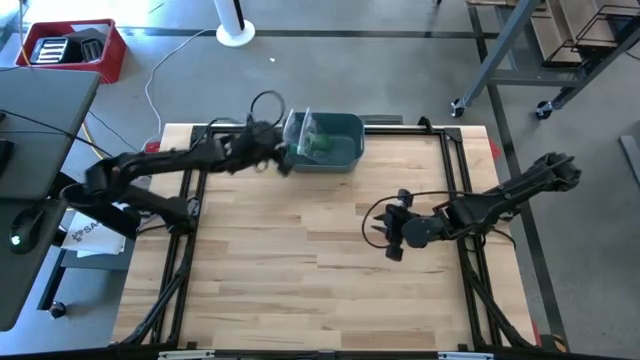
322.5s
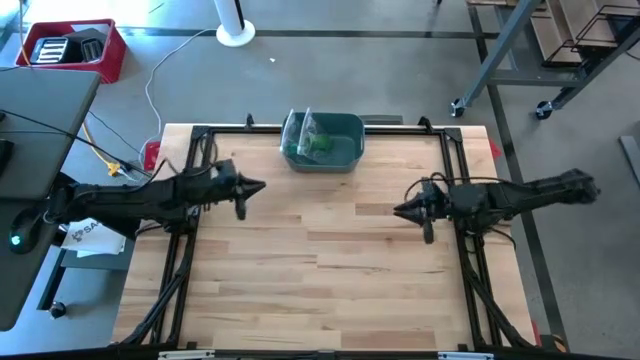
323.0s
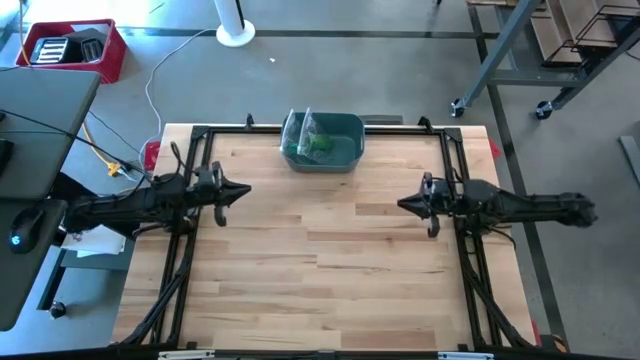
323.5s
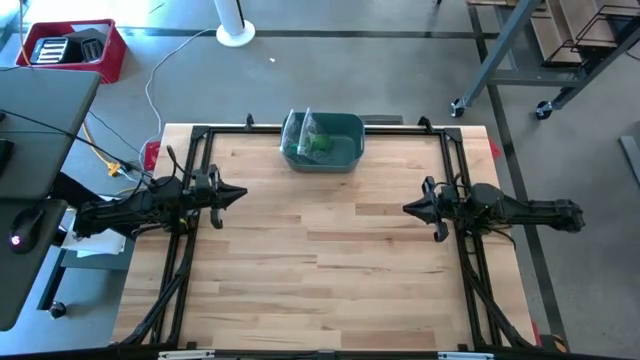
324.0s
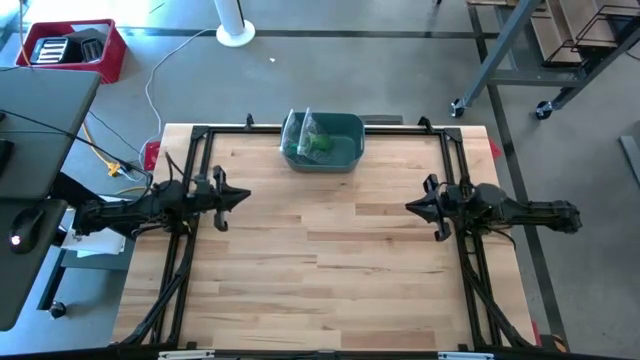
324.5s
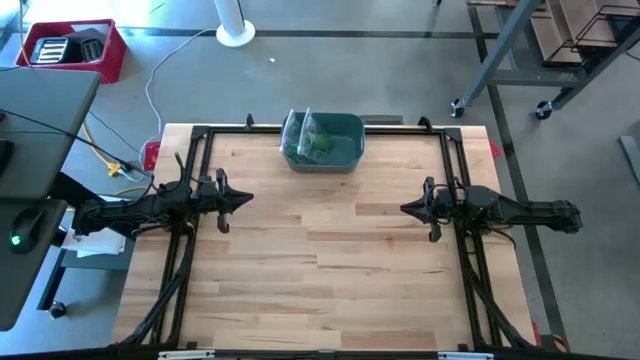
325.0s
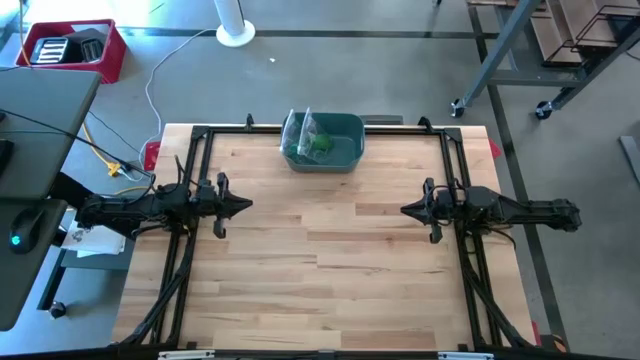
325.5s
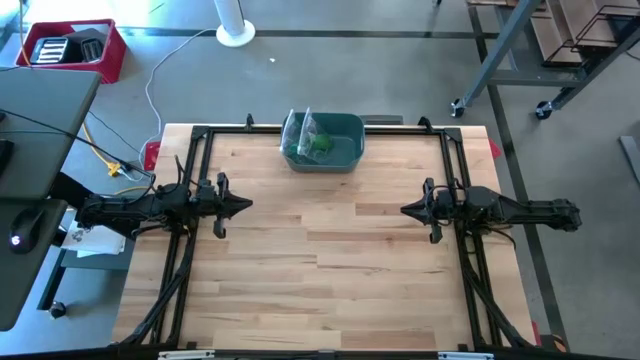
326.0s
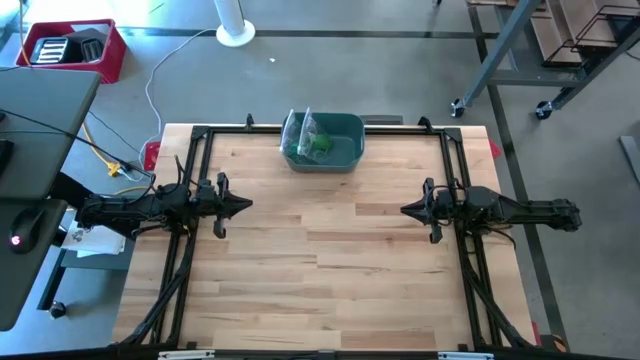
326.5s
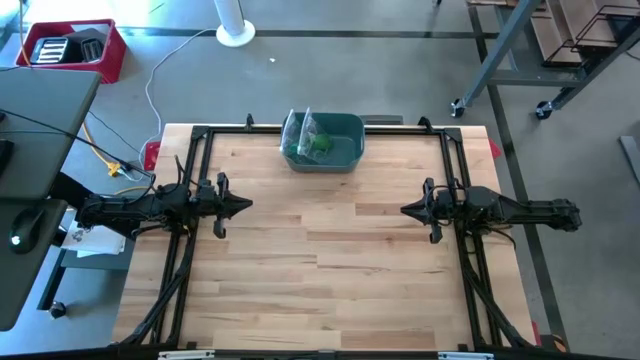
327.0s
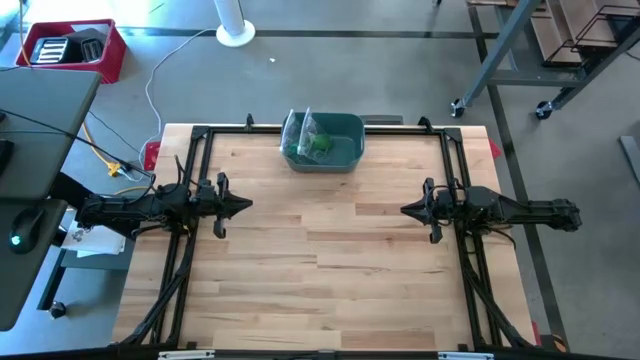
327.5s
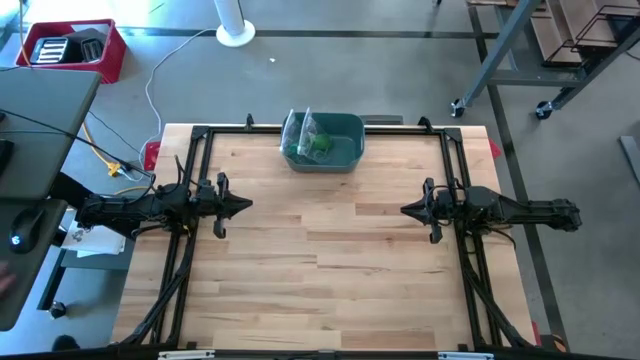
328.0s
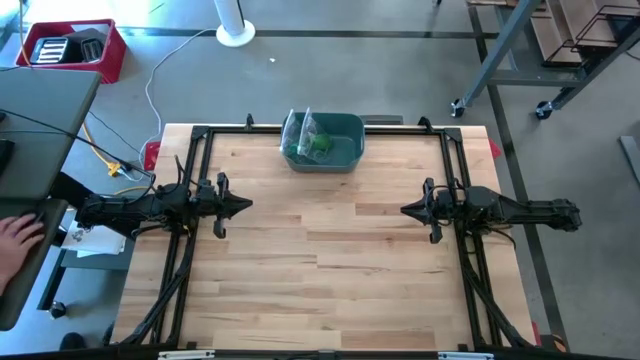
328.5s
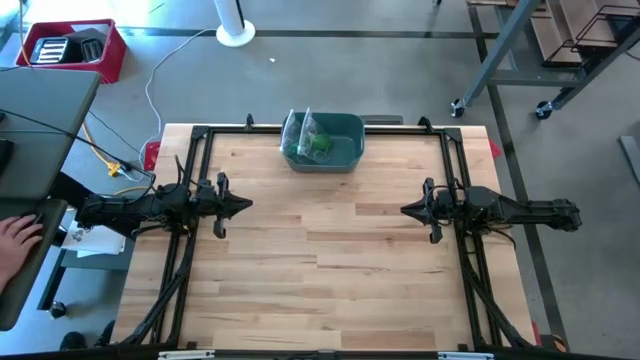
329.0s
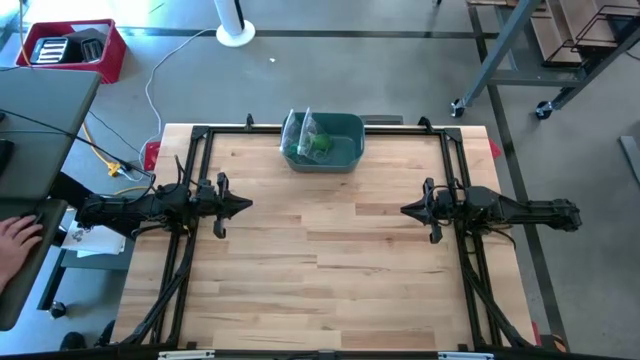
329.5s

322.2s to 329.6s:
Task: Roll bandage
Return to Home Position

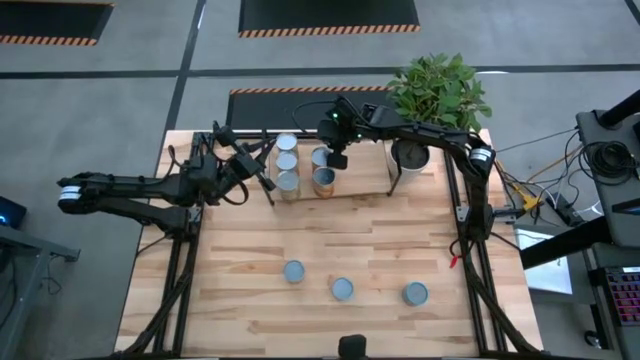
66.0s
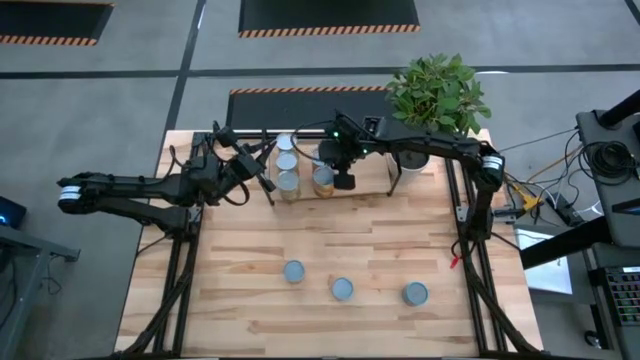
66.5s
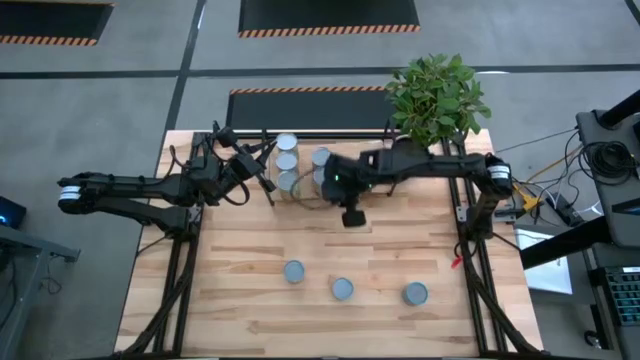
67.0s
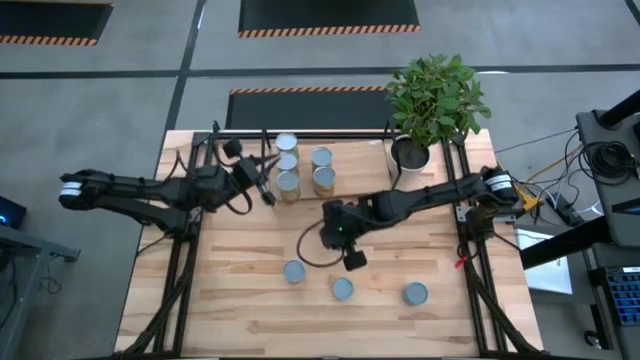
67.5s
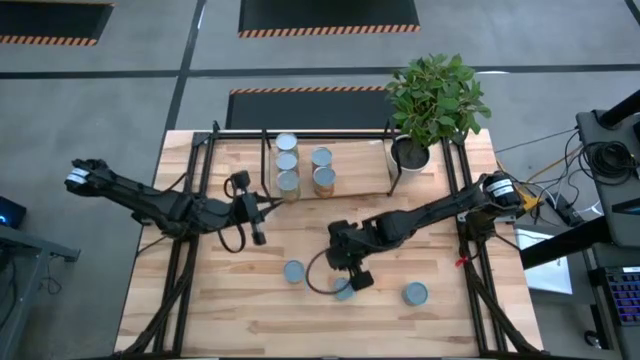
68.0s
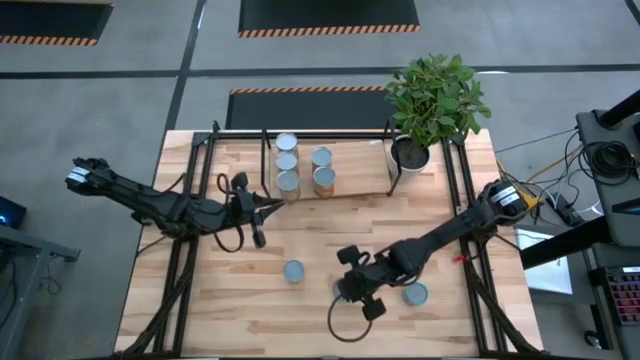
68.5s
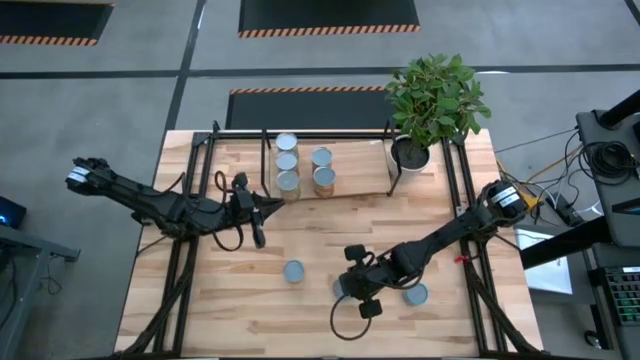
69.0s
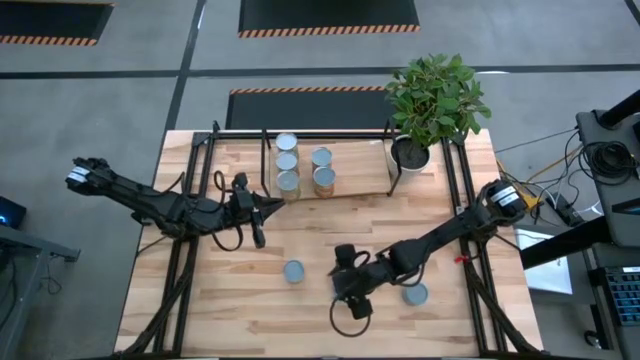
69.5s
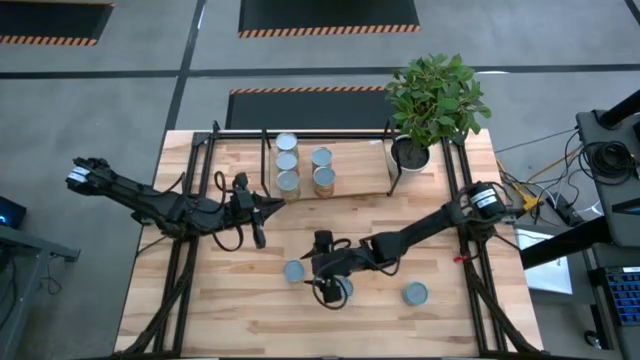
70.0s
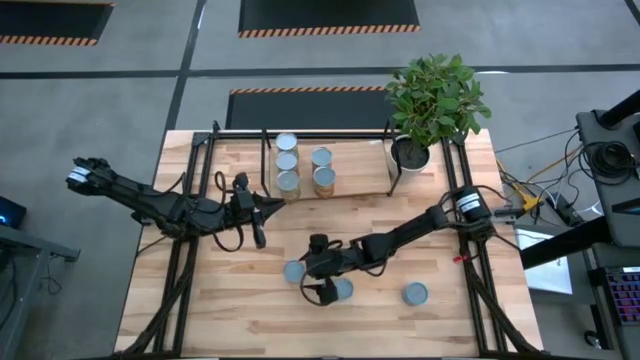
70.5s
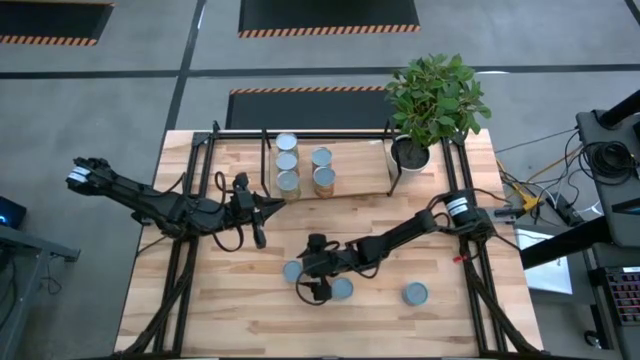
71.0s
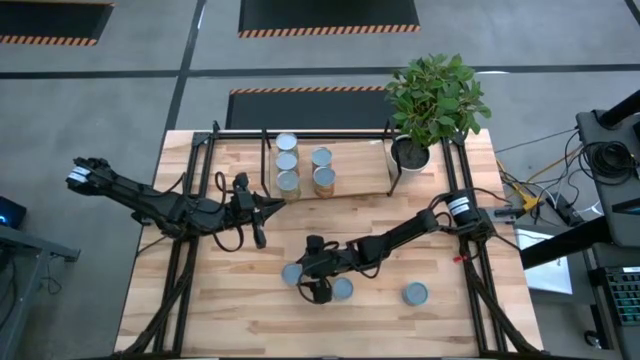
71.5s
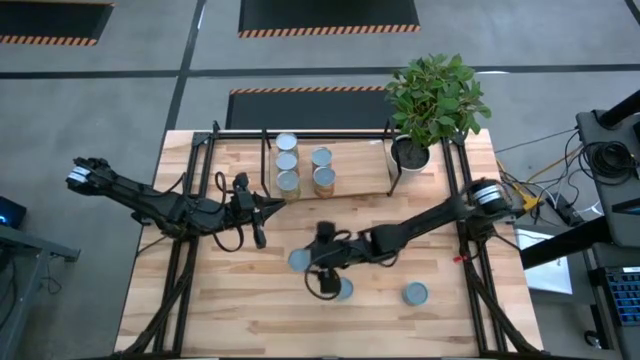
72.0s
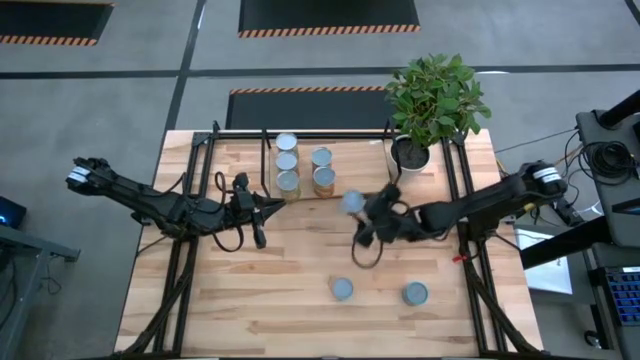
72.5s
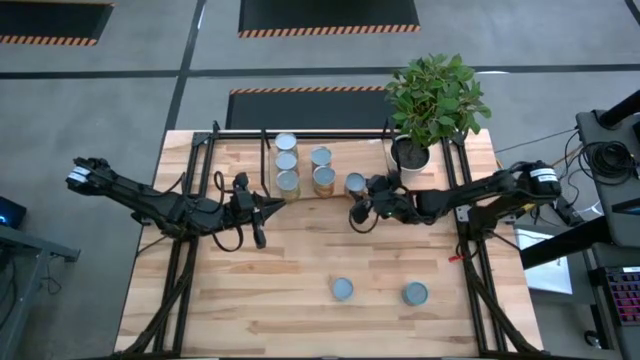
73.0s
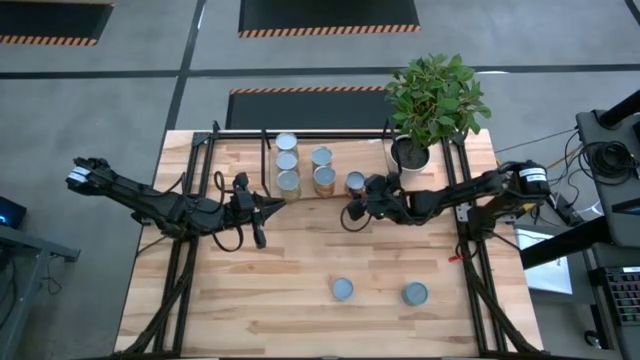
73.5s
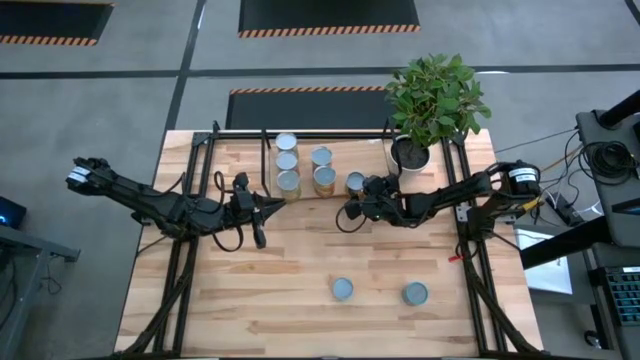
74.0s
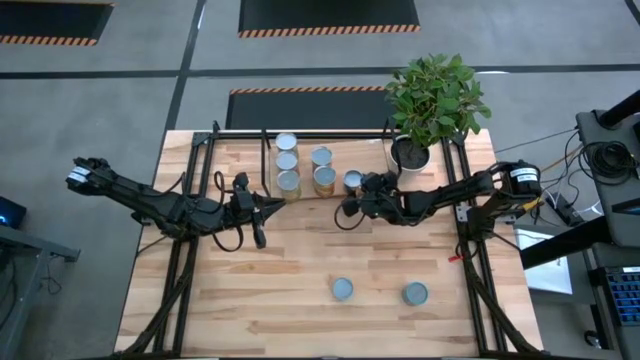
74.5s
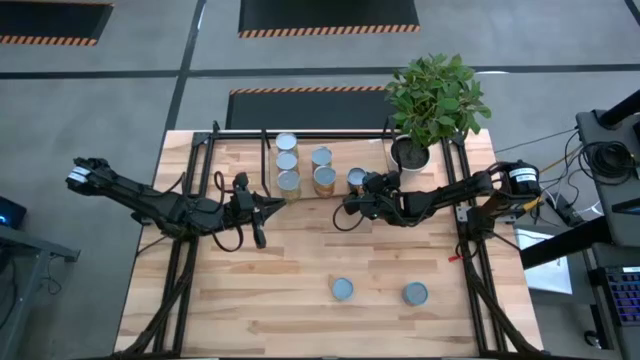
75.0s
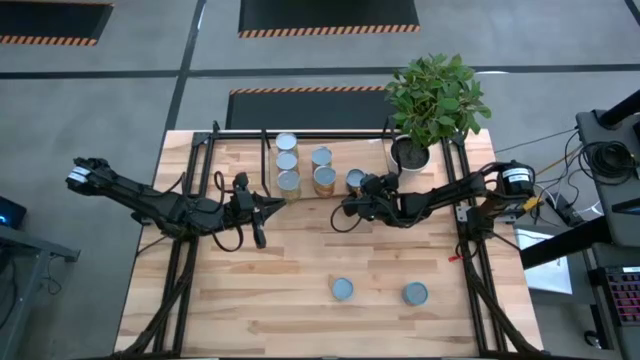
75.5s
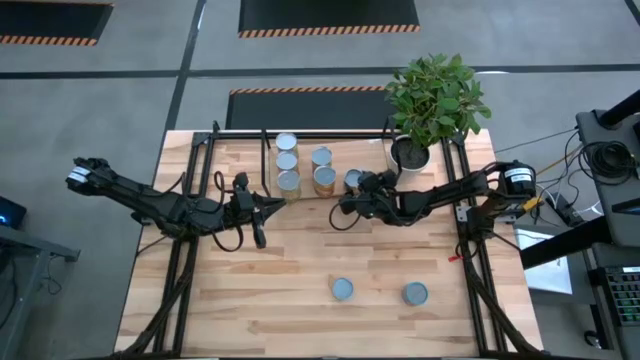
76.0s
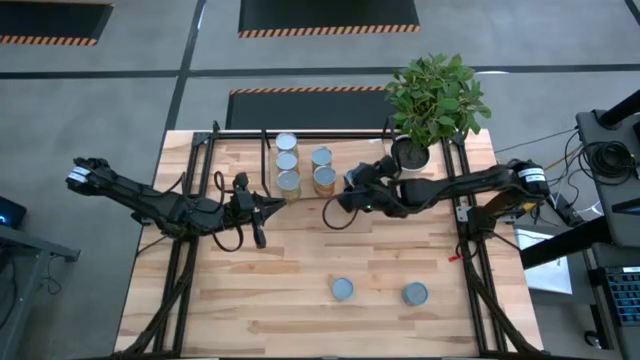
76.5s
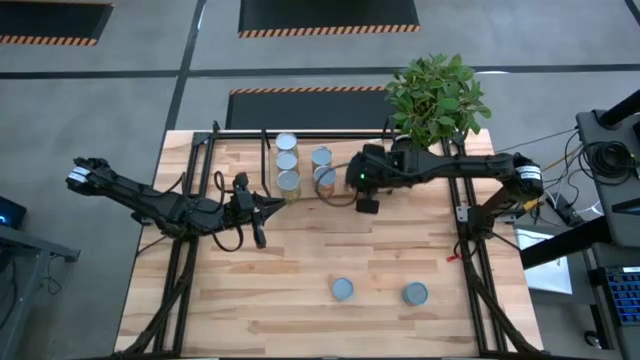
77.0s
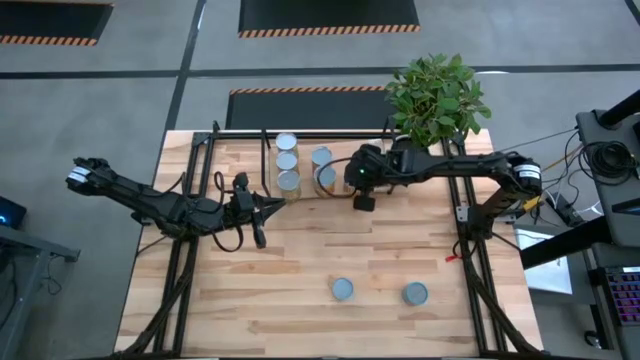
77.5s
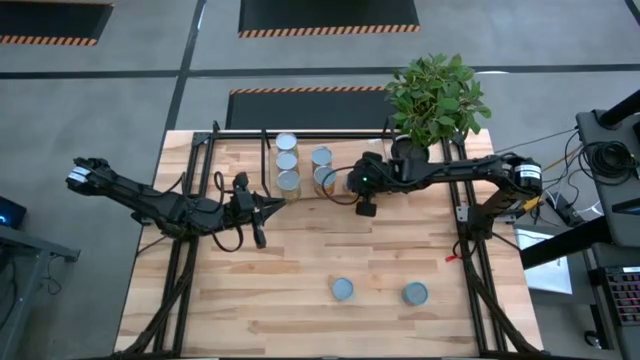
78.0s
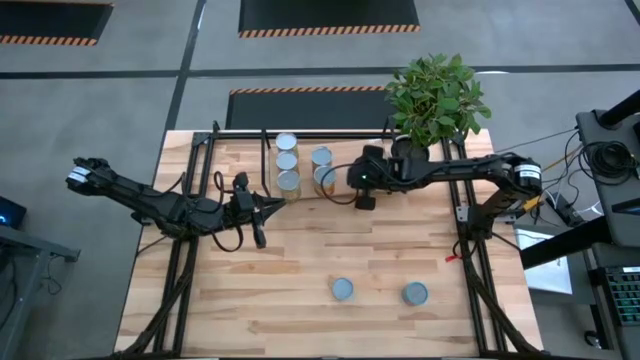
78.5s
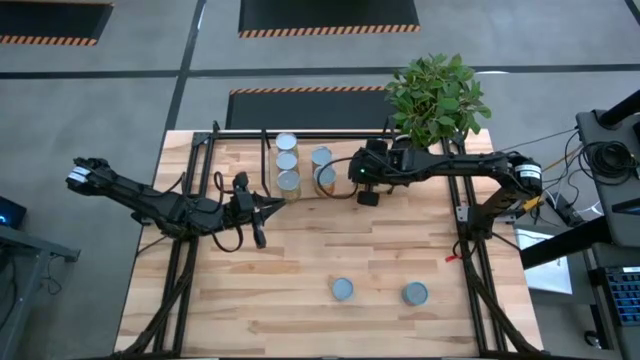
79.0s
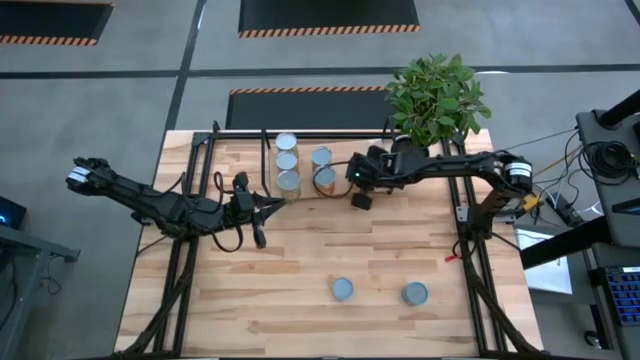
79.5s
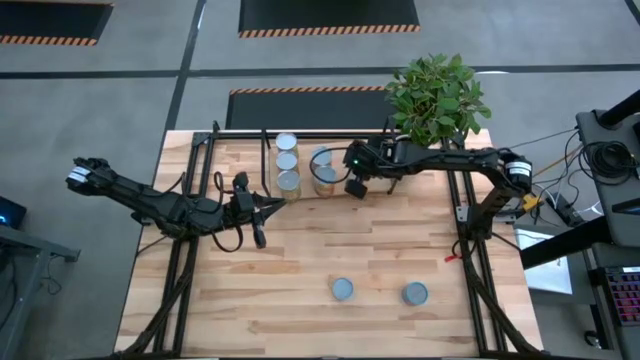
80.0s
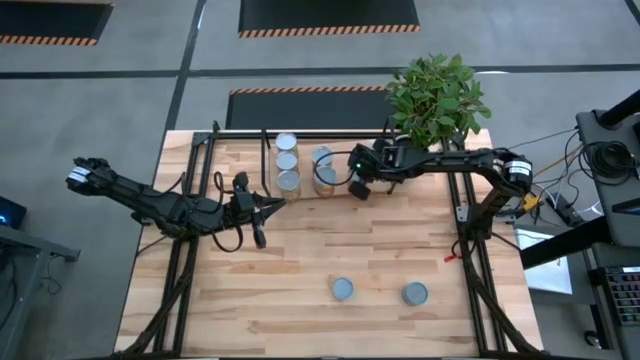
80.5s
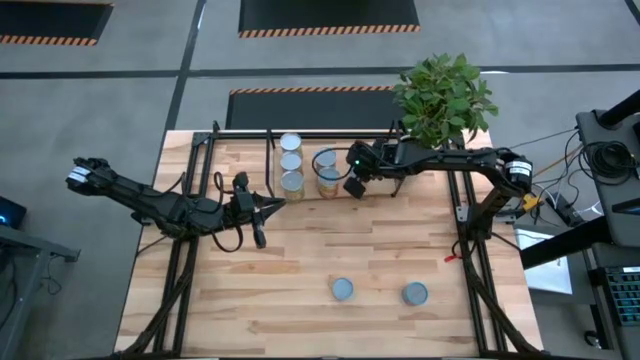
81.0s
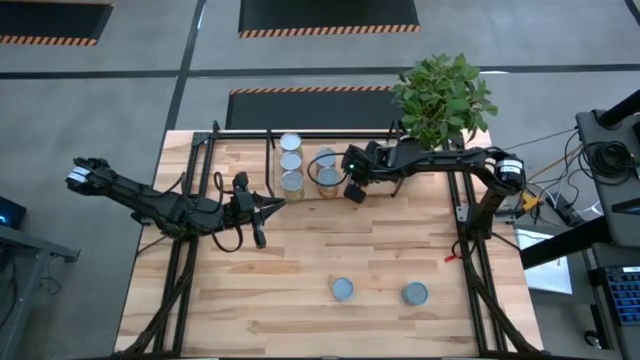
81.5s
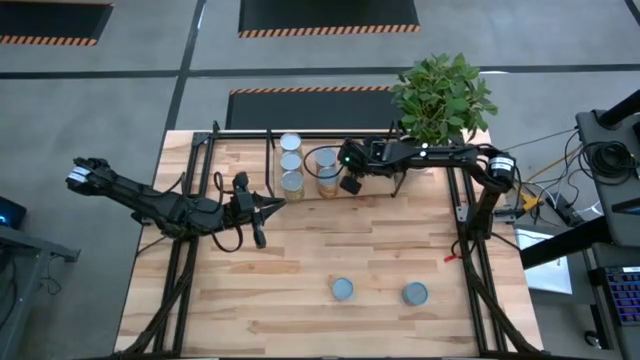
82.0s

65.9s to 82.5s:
Task: Pick and place cans onto a shelf
Put the canned chili on the shelf
